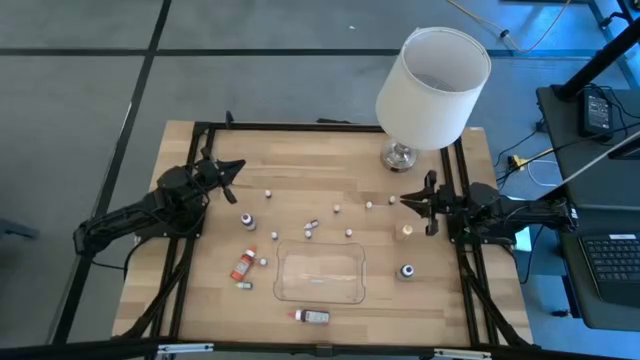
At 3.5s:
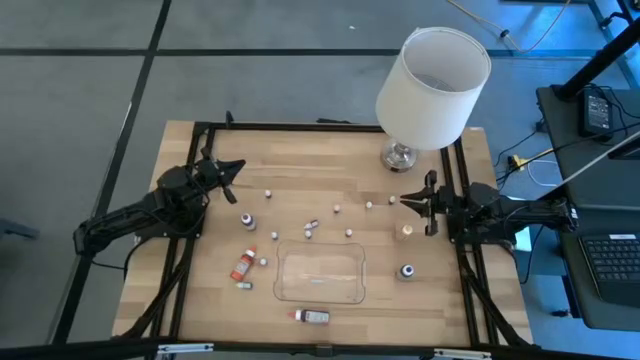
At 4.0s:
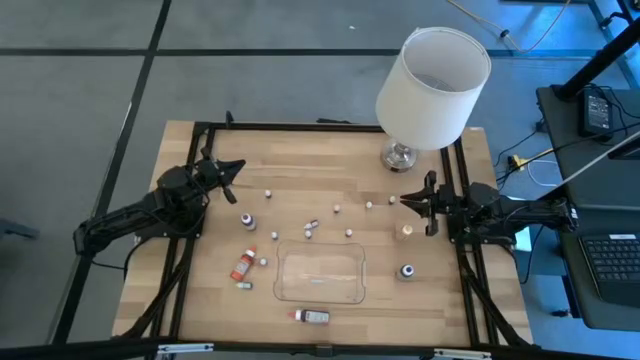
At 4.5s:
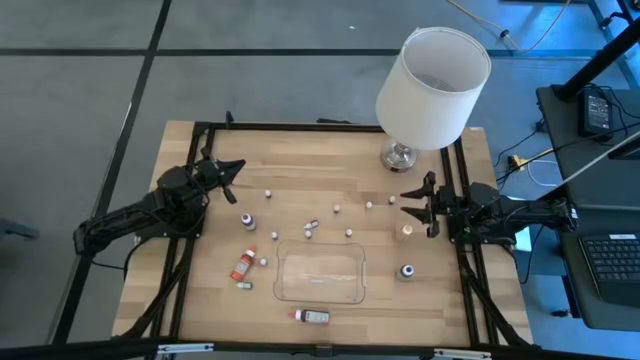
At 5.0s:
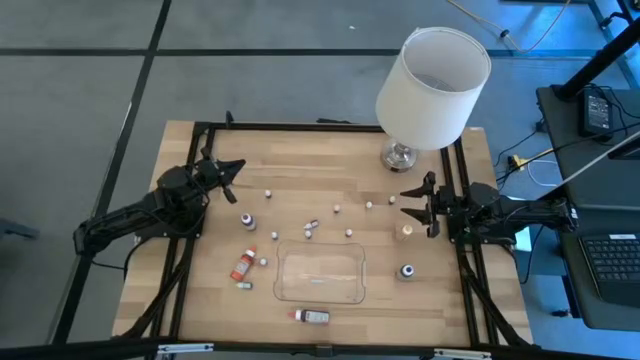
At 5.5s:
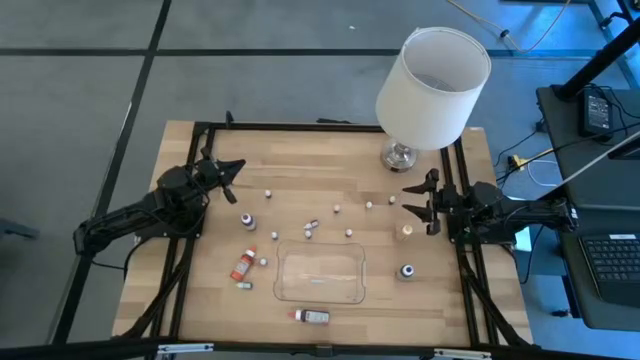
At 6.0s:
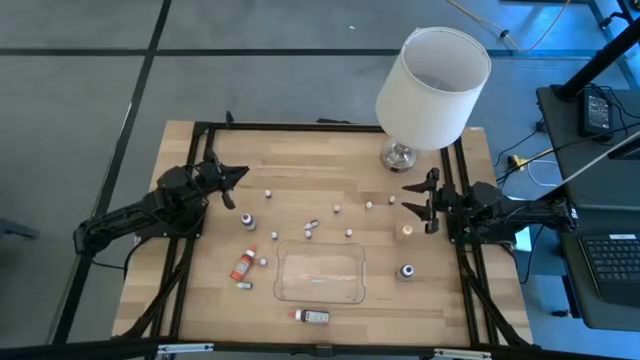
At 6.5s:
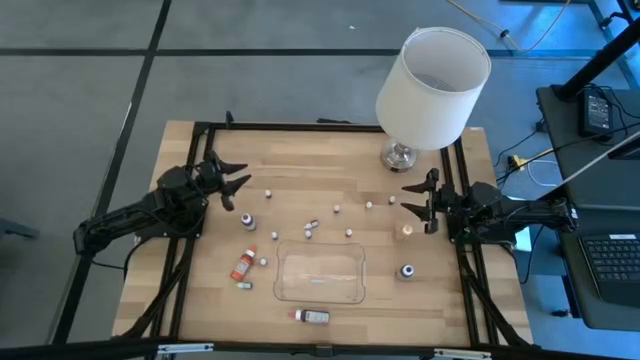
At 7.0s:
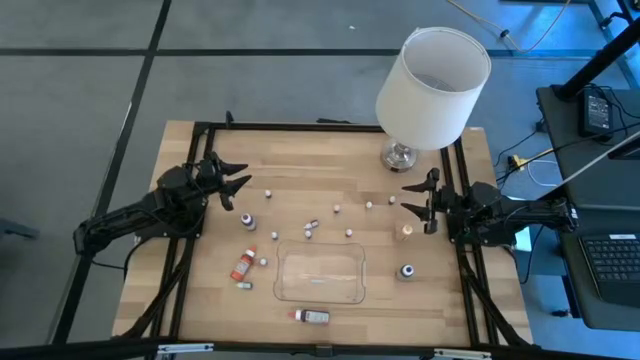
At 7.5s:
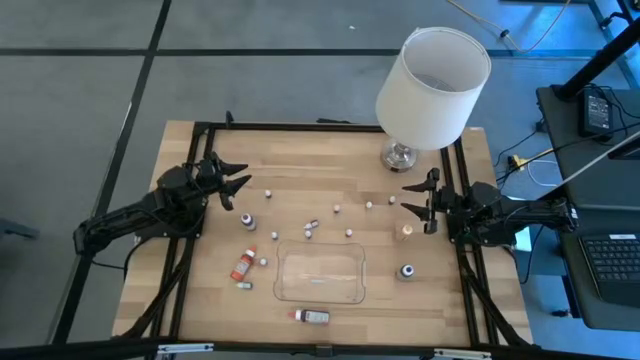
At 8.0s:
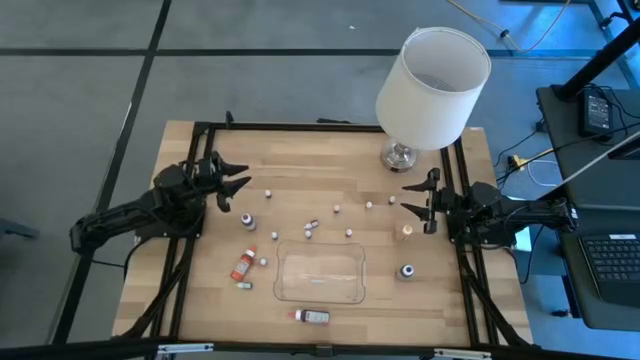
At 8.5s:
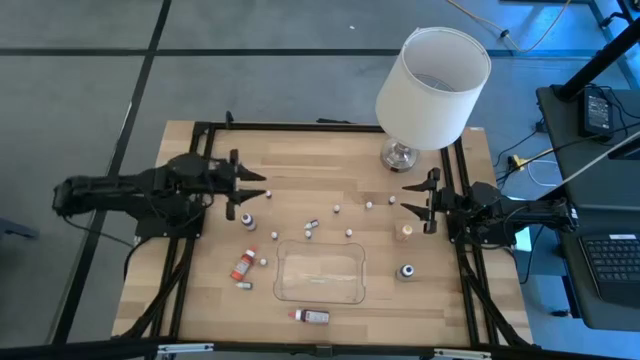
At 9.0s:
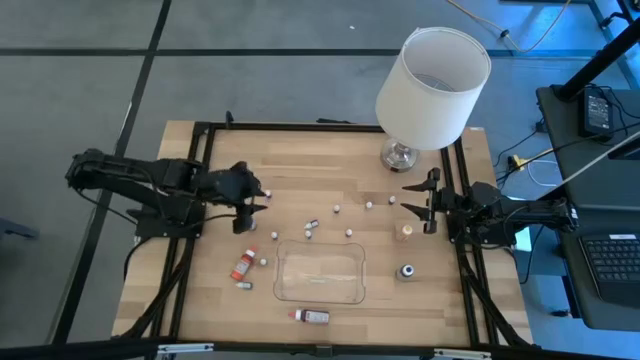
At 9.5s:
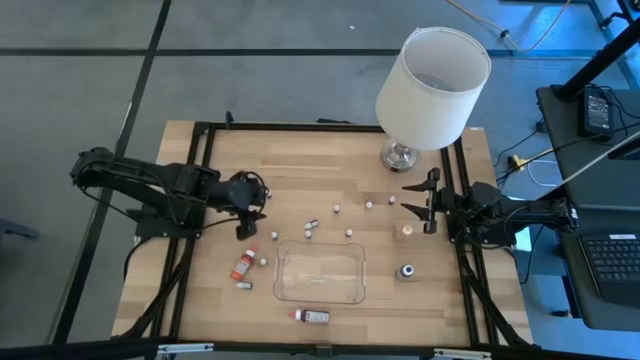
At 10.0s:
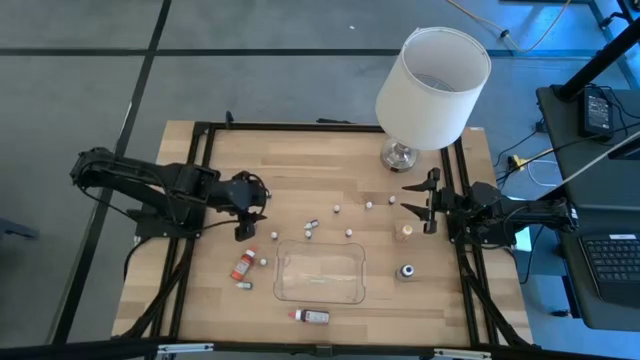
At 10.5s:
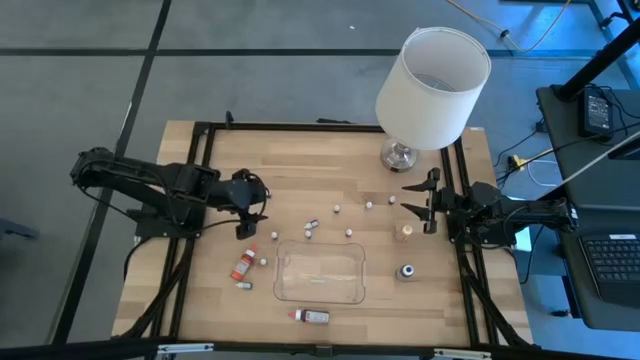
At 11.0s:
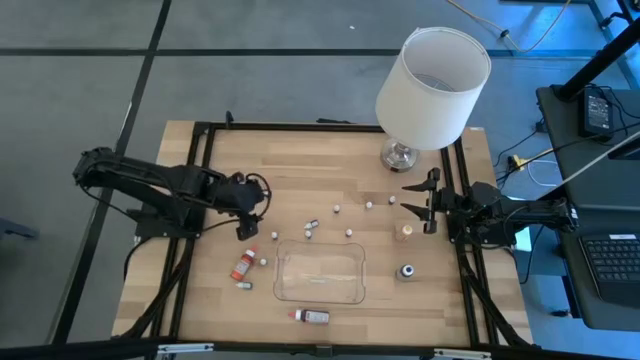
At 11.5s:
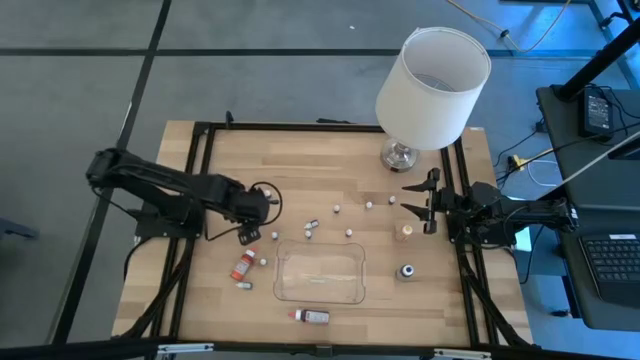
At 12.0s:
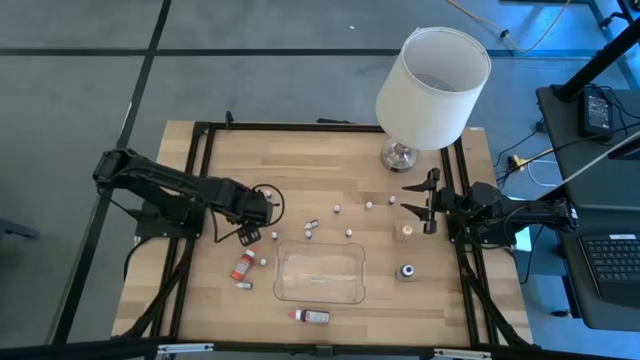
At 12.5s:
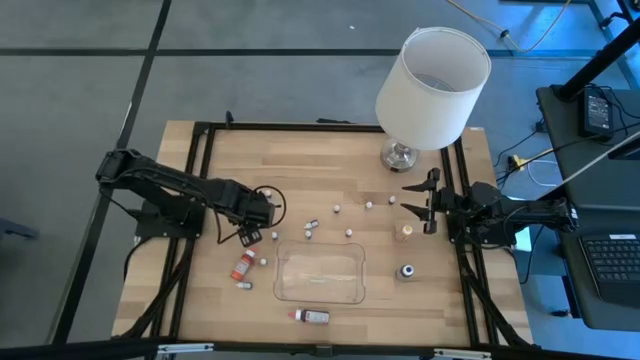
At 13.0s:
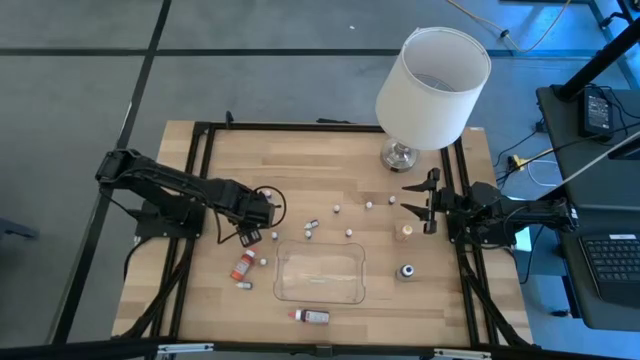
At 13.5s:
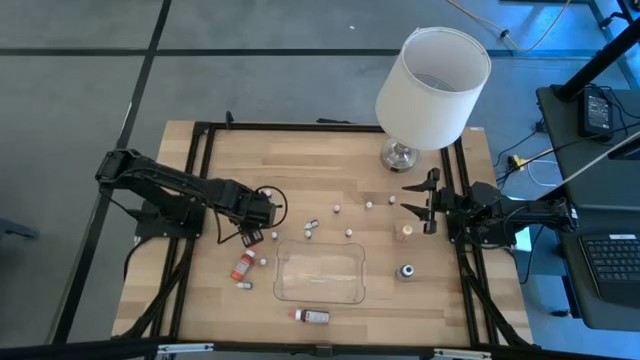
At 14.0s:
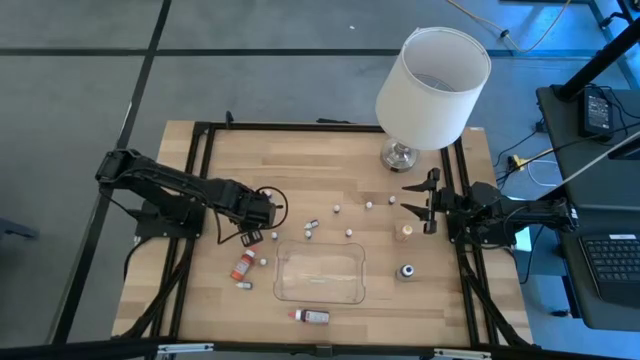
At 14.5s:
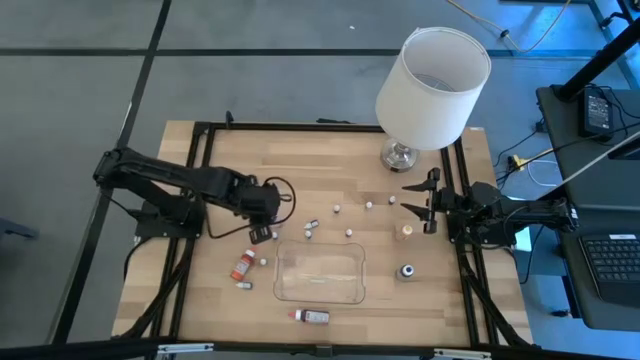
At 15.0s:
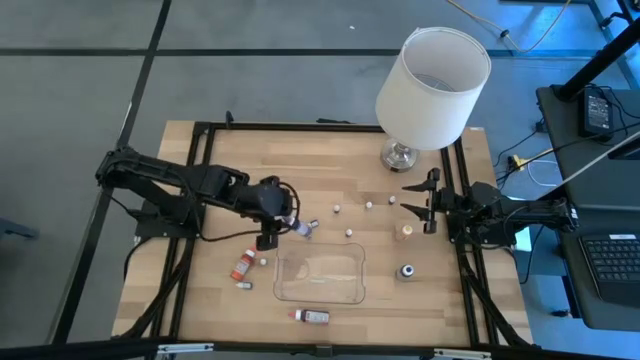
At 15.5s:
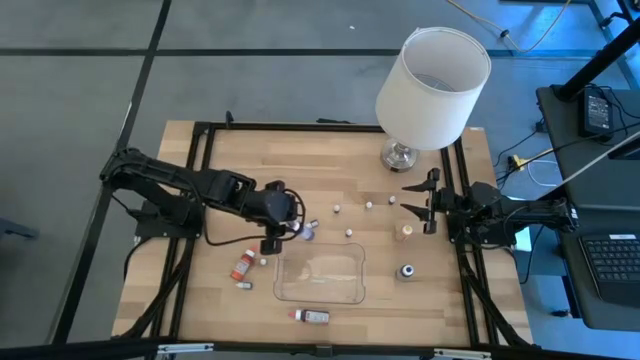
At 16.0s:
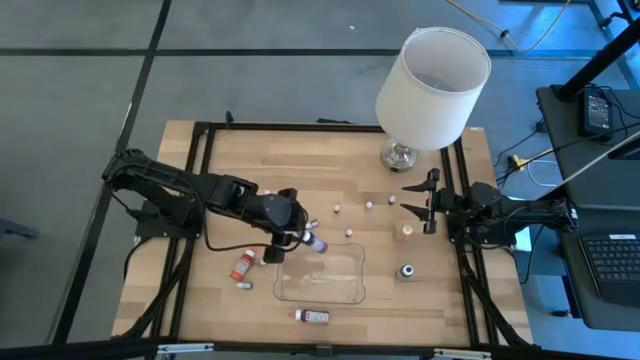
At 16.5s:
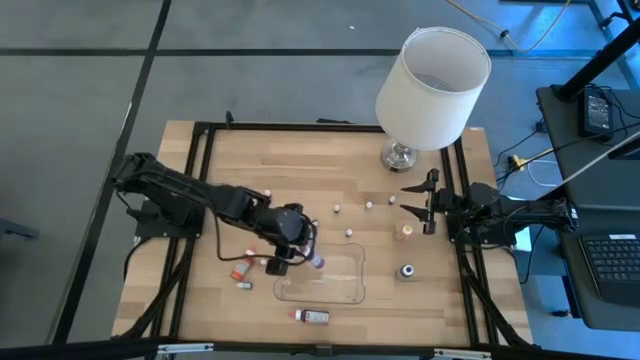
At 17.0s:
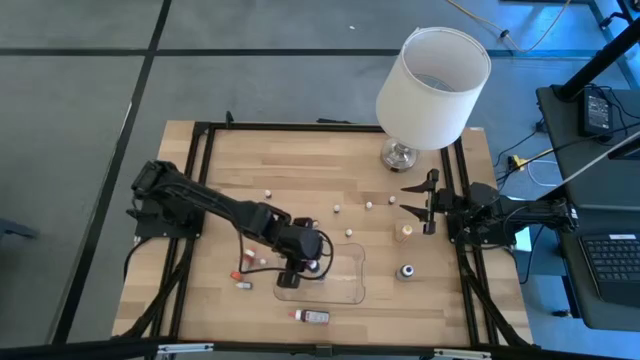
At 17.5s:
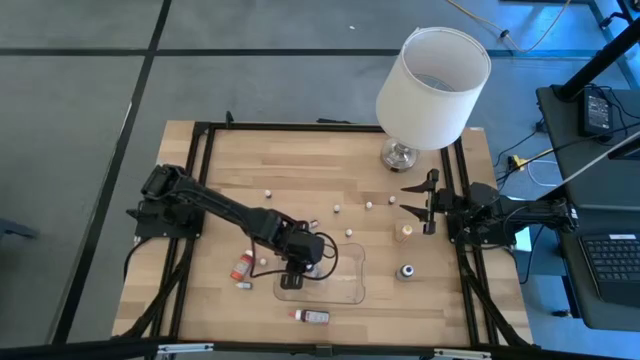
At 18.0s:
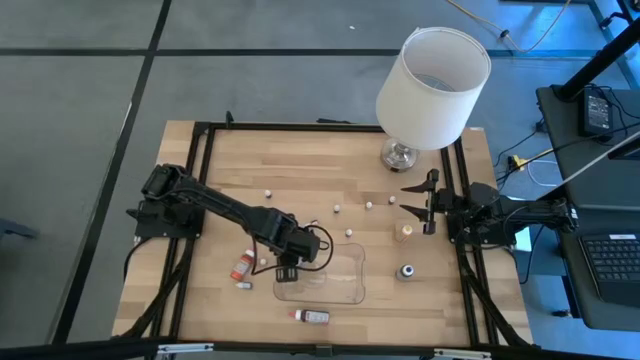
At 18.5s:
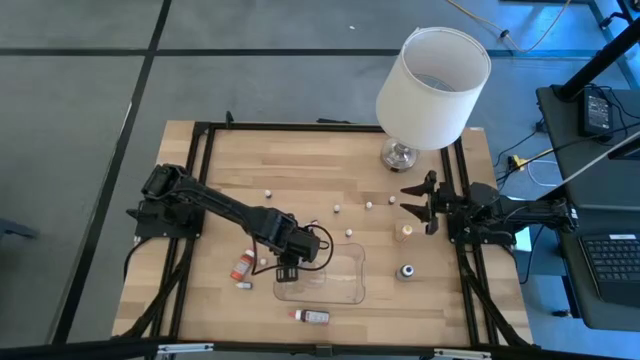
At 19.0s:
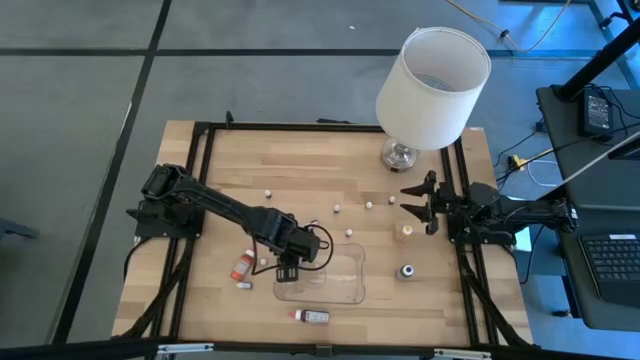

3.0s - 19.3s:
Task: Pick & Place food coloring
Put the big purple food coloring bottle into the container

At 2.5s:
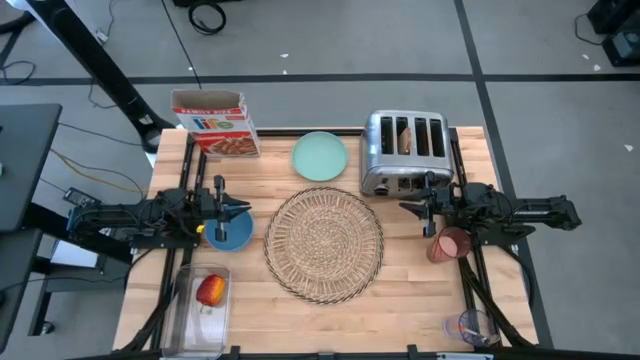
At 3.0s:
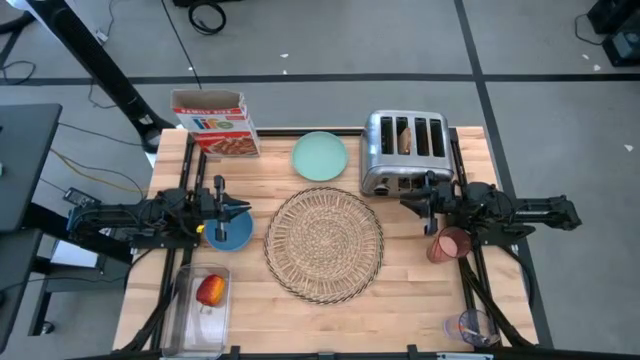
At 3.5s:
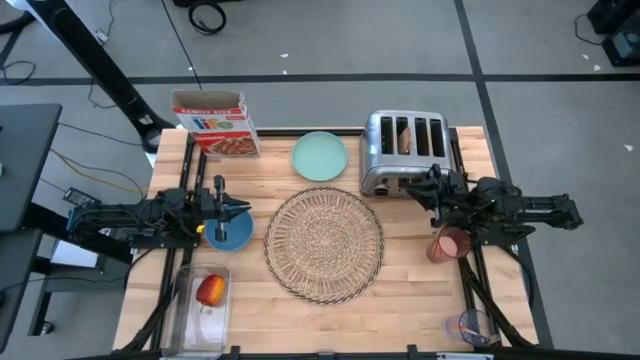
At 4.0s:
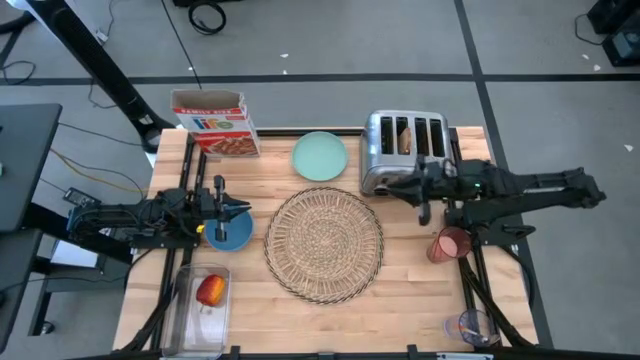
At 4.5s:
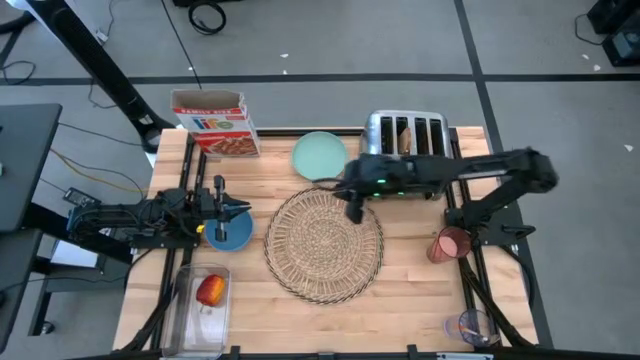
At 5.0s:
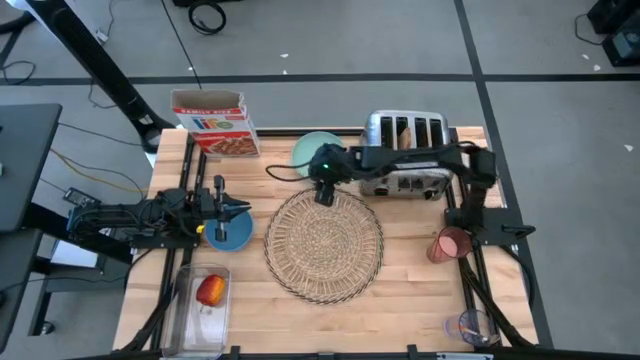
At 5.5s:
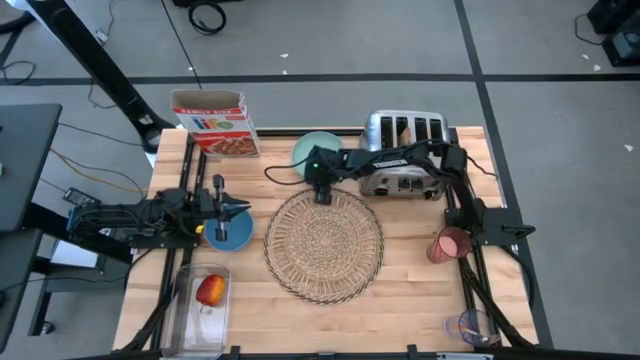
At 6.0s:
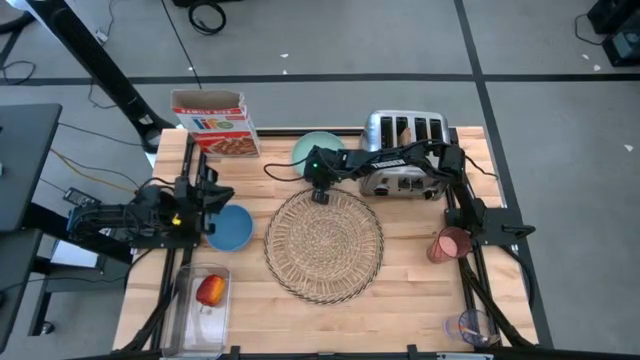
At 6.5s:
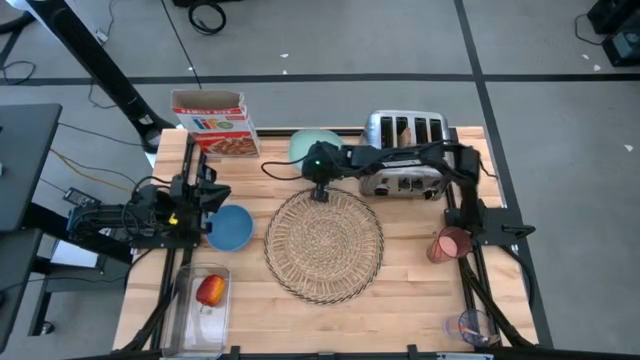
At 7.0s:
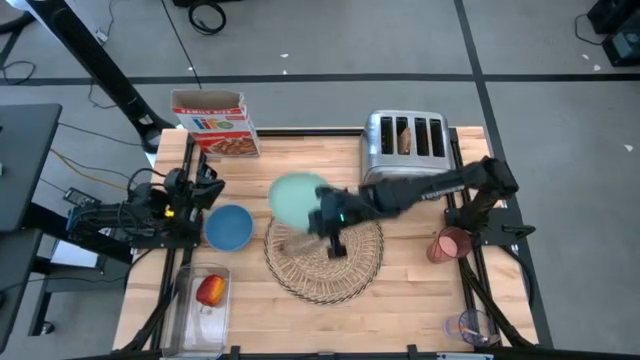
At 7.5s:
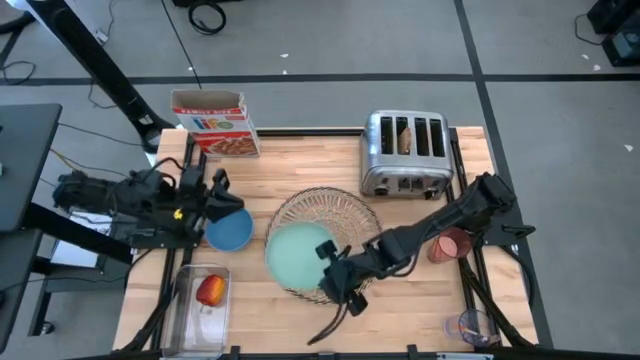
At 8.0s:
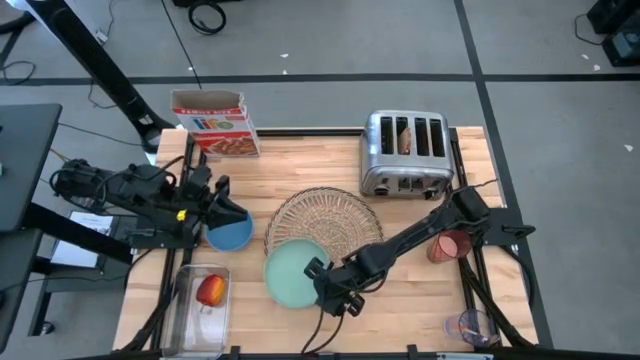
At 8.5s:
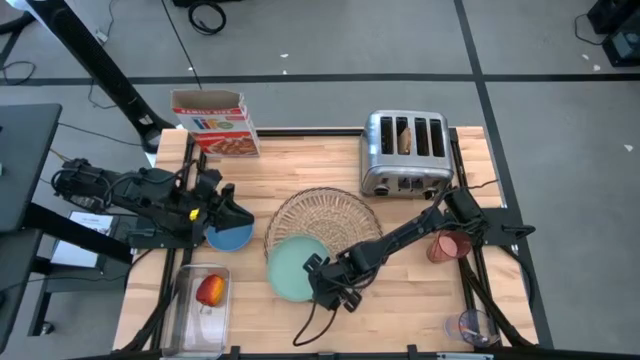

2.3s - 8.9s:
Task: Arrange a breakfast setting
Put the light green plate on the brown tablemat
